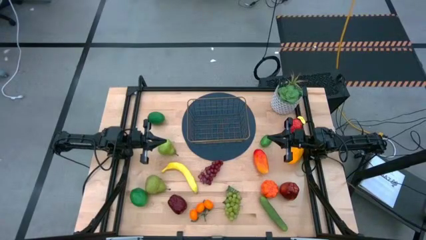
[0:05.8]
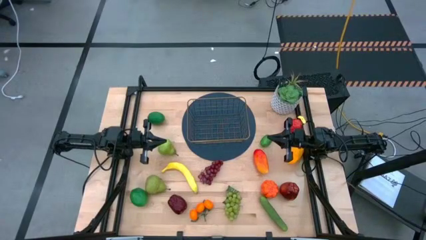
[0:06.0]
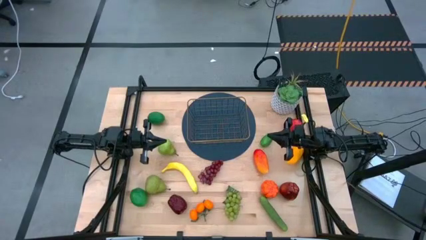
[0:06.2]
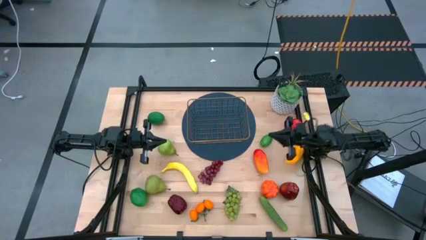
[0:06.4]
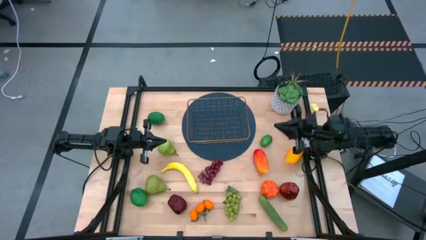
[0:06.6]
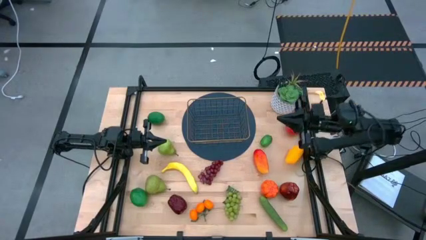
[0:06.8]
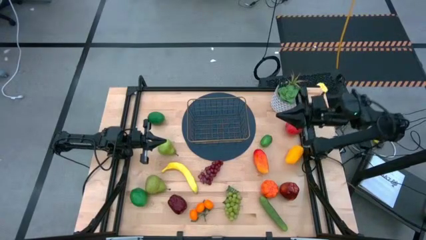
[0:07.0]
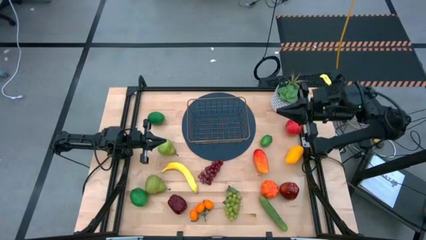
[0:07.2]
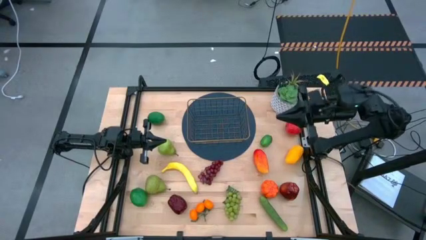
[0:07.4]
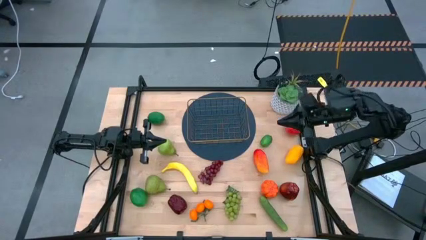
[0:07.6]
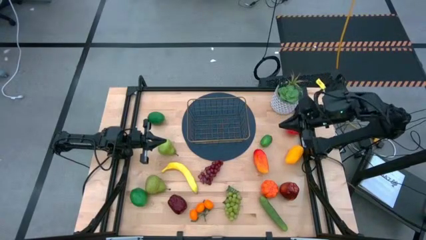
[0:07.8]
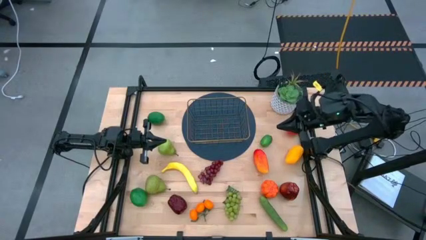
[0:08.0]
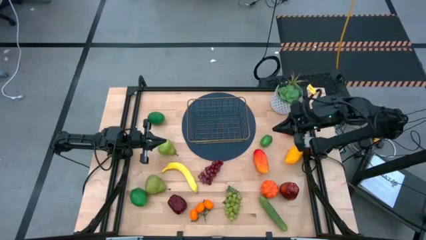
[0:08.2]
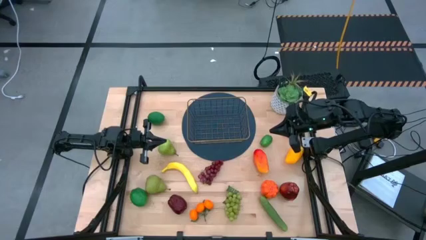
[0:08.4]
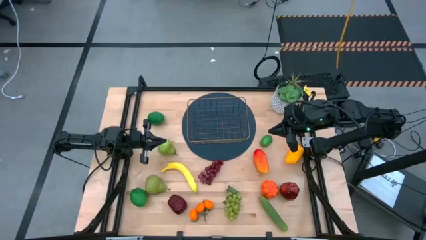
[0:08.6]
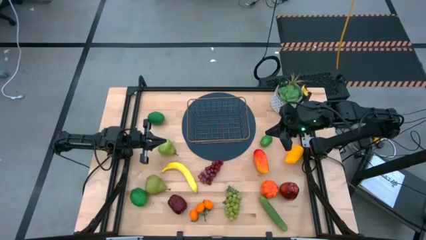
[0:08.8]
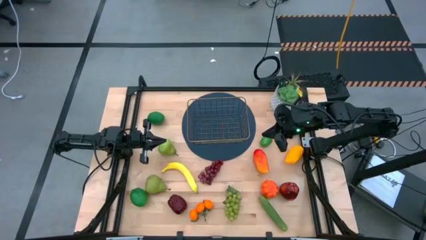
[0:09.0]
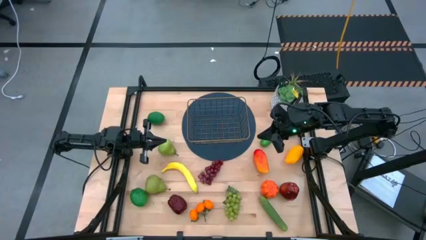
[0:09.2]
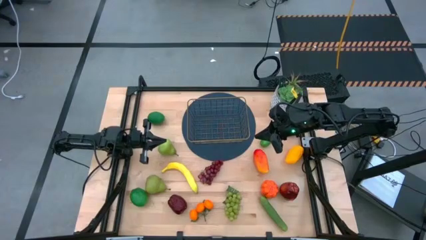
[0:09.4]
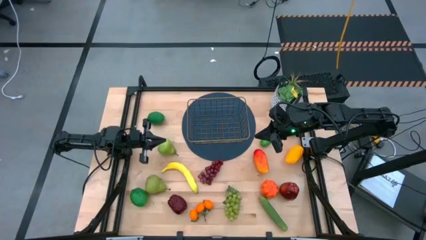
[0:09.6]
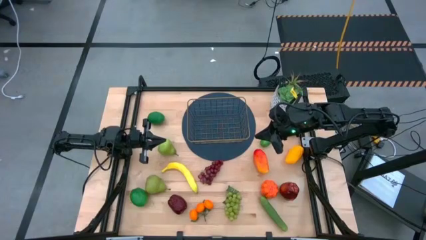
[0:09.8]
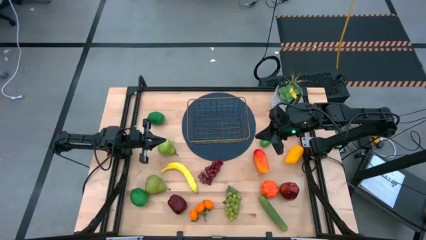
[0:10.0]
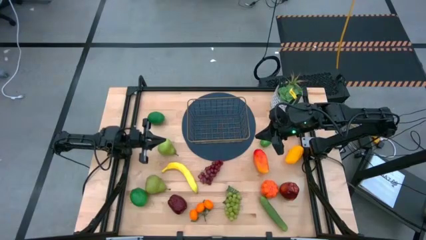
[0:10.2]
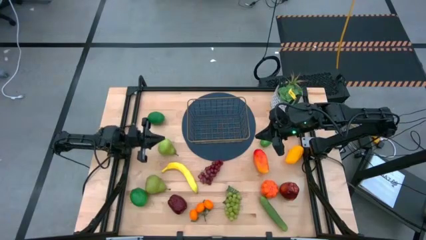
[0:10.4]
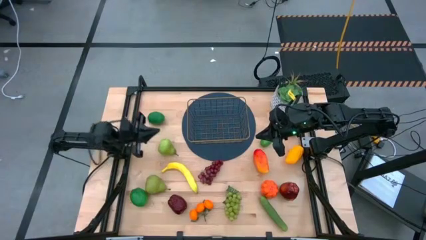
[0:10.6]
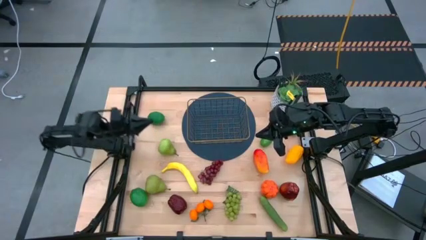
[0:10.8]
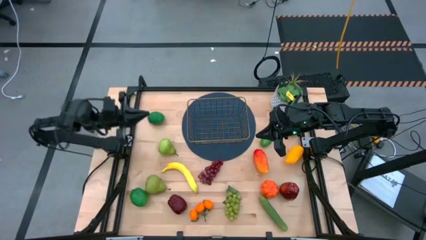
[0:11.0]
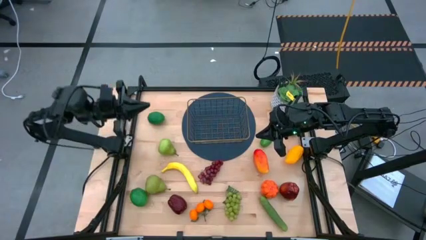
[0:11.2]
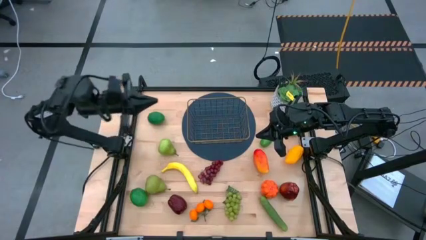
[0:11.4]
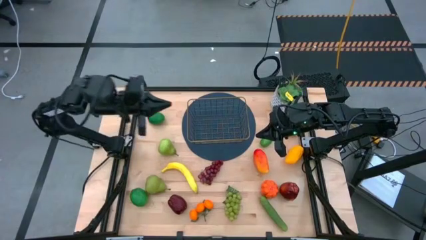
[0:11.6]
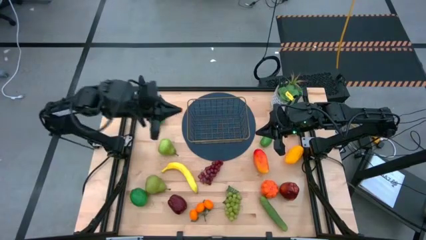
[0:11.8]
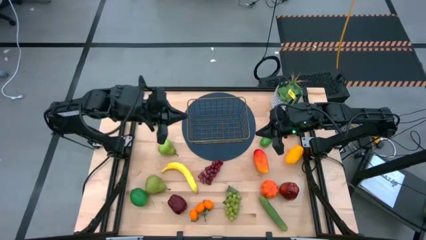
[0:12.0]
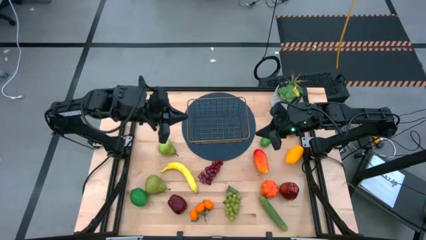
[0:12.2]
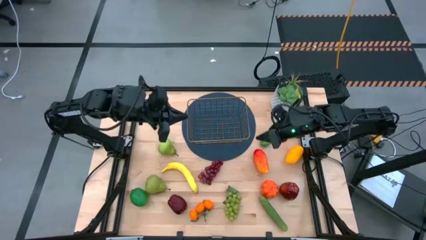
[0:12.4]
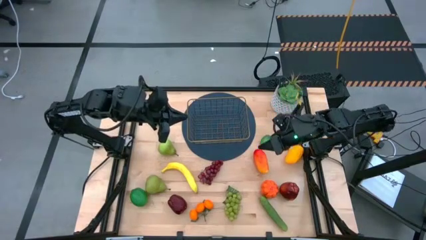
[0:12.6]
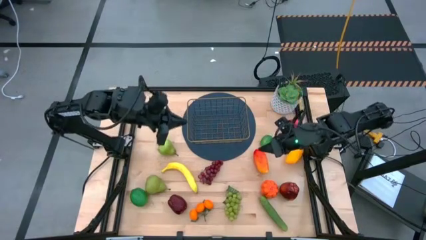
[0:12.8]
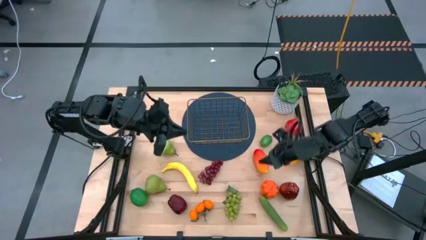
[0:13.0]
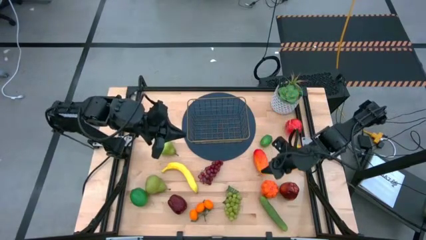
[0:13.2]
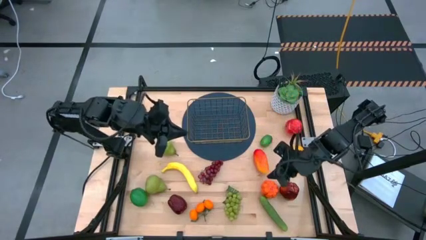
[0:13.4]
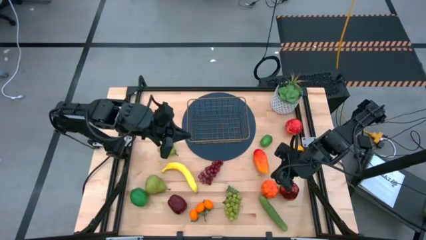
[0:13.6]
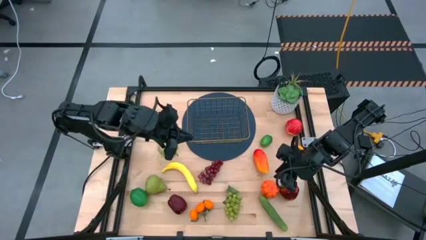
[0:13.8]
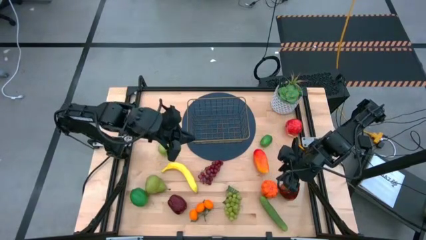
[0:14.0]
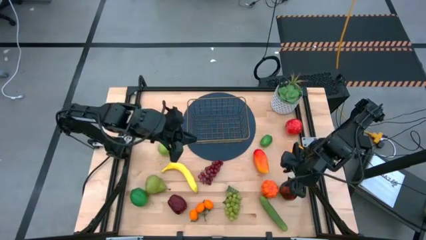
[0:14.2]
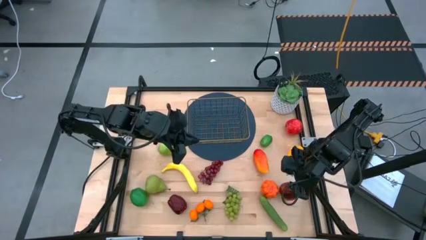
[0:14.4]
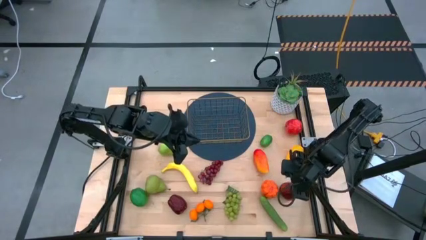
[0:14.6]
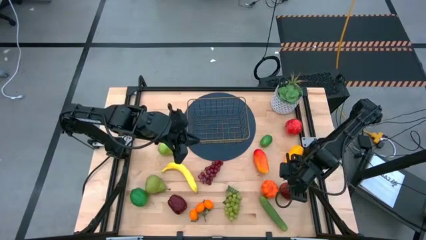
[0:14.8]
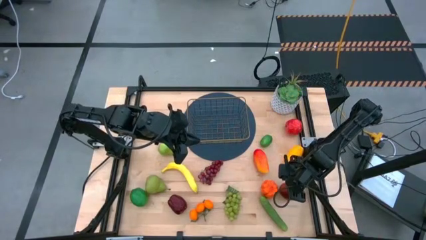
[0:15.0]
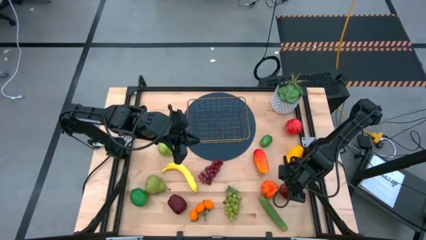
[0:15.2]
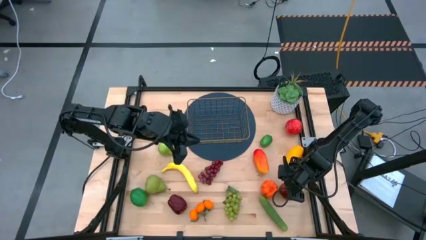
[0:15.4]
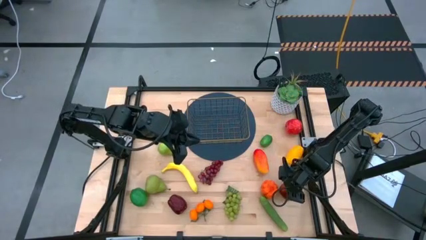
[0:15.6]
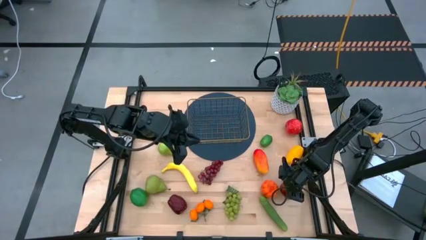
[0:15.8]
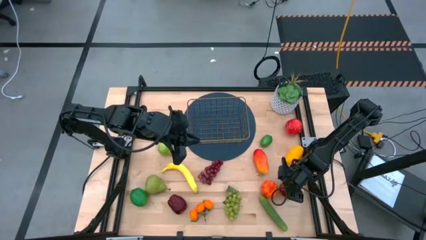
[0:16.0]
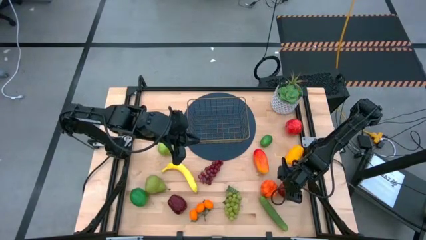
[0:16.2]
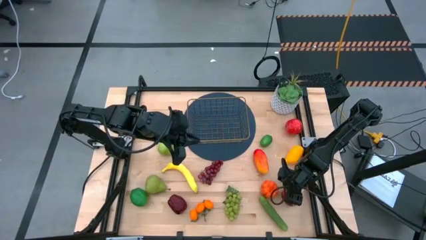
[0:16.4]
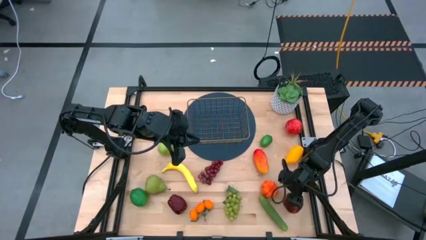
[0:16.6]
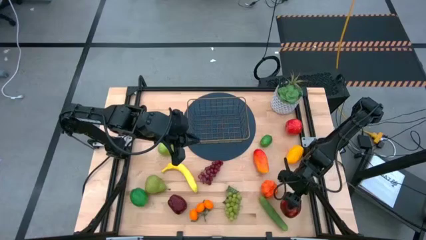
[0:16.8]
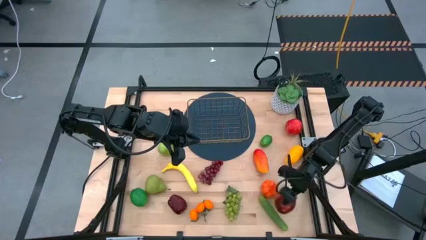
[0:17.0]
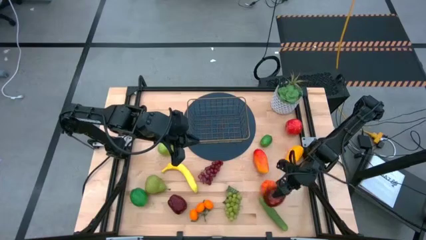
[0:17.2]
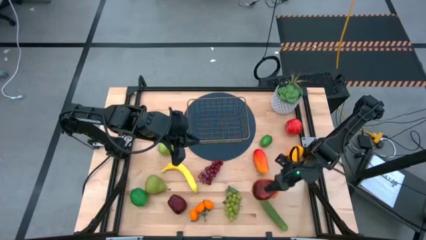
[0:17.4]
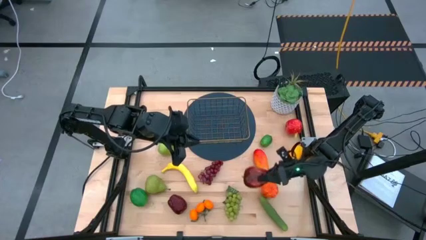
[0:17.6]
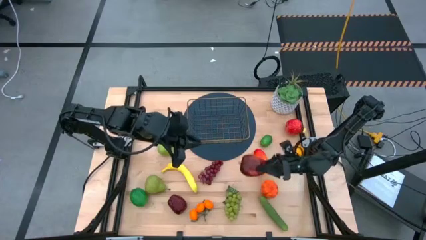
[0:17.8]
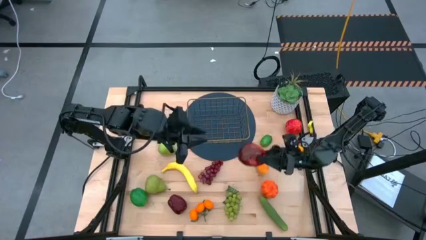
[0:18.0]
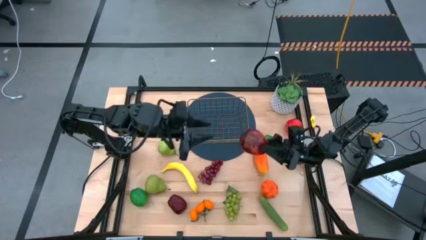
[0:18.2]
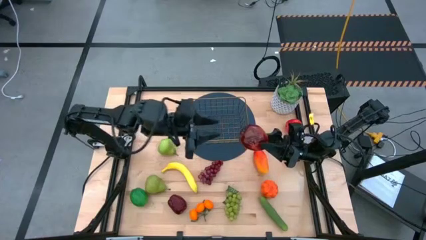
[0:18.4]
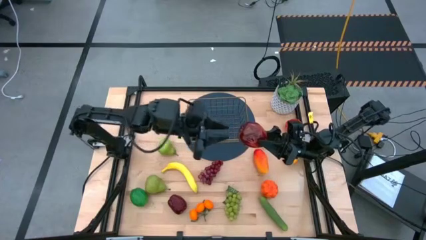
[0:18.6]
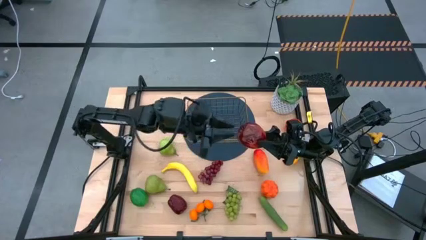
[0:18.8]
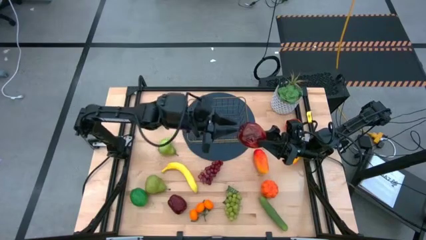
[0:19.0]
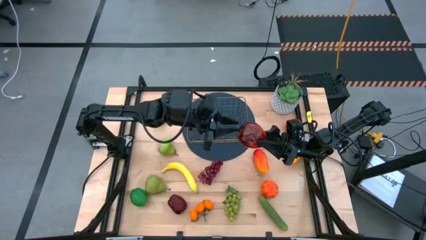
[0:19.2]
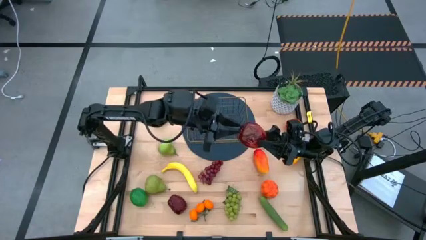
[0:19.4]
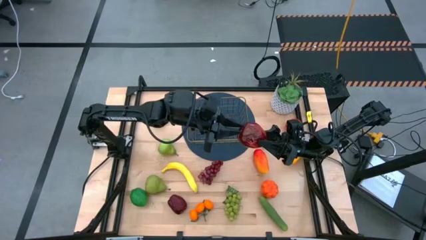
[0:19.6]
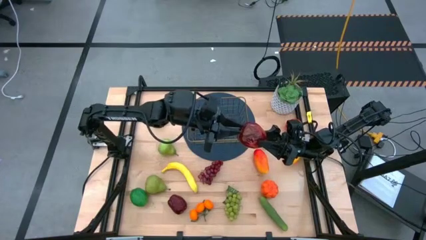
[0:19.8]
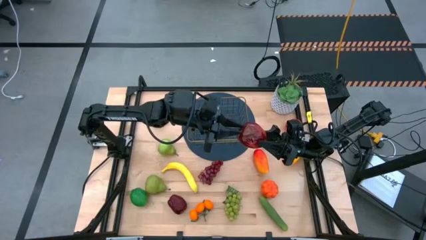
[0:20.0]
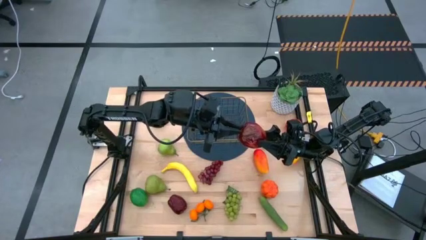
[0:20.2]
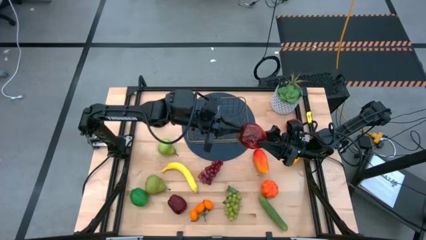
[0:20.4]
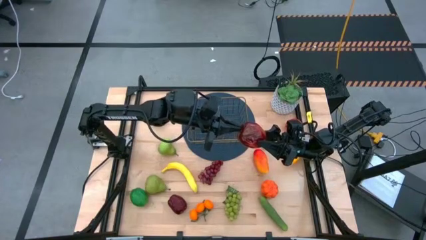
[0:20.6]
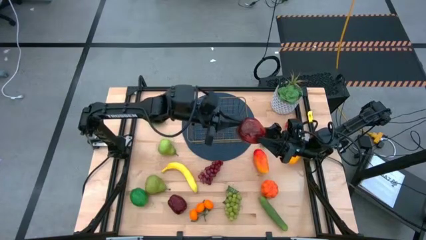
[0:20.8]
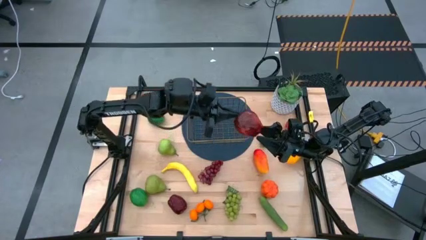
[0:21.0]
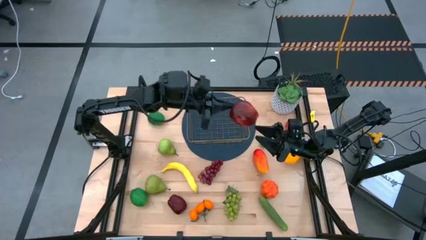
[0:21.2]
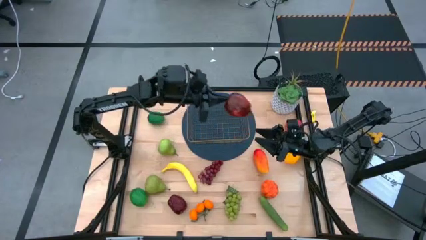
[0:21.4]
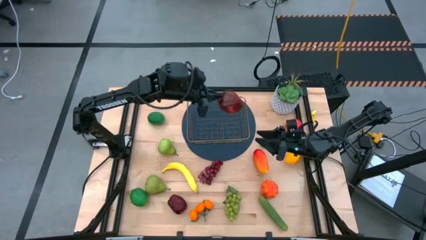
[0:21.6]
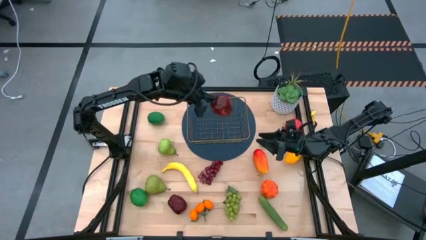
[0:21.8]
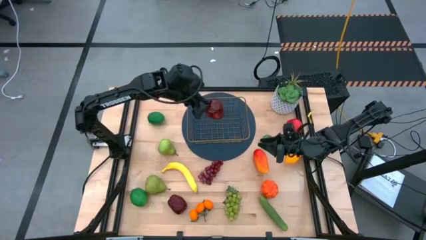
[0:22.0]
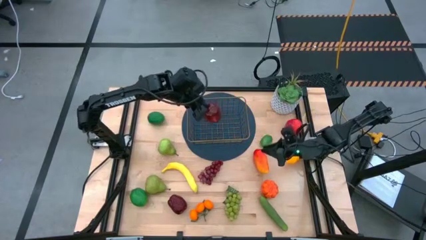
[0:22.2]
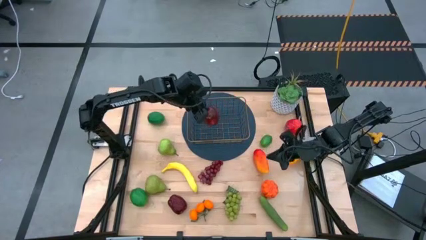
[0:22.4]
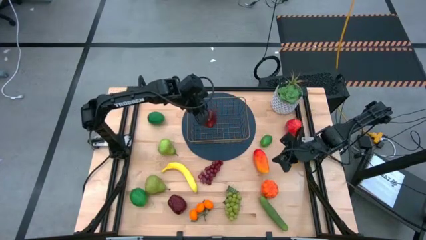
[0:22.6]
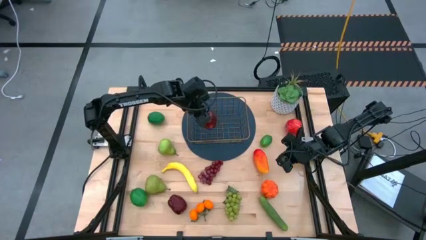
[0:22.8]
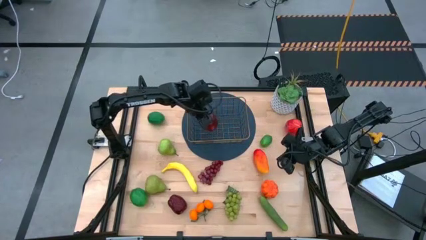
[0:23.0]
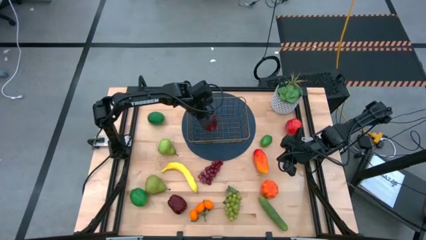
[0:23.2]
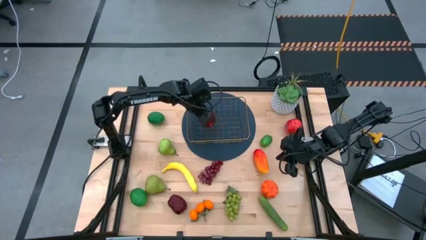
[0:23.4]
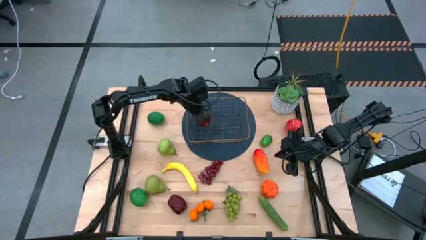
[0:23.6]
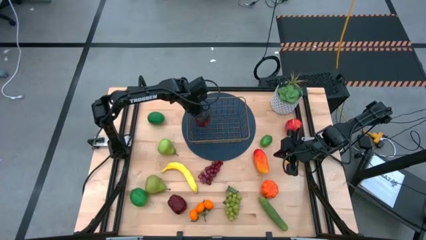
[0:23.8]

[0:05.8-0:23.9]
Task: Build produce basket
Put the right dark red apple into the wire basket
